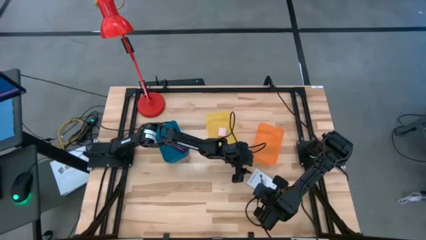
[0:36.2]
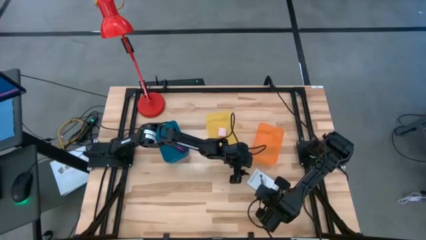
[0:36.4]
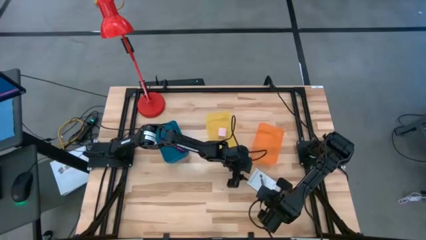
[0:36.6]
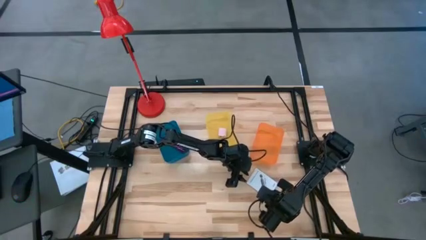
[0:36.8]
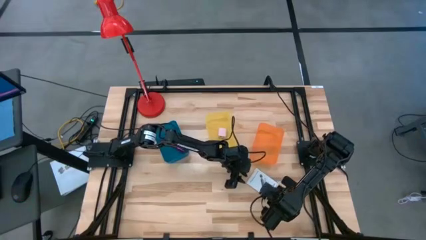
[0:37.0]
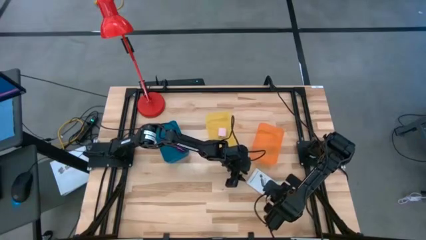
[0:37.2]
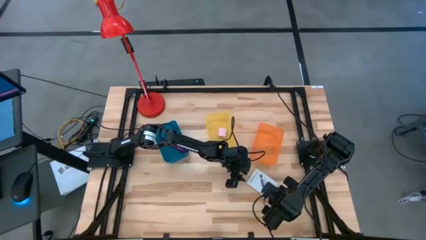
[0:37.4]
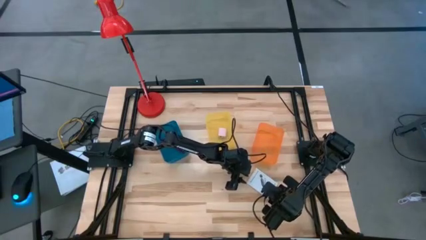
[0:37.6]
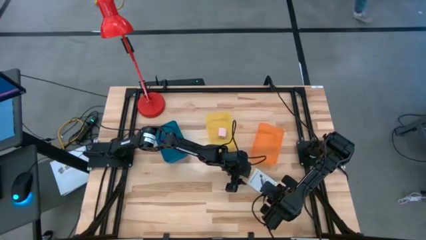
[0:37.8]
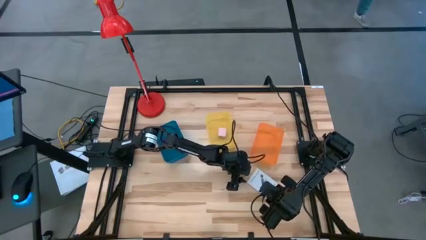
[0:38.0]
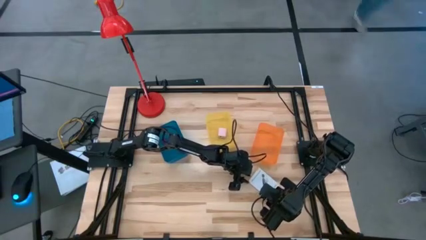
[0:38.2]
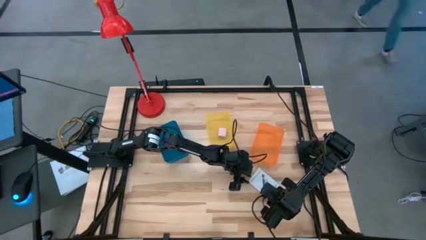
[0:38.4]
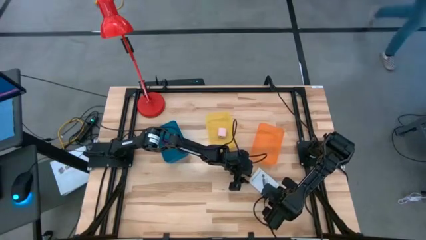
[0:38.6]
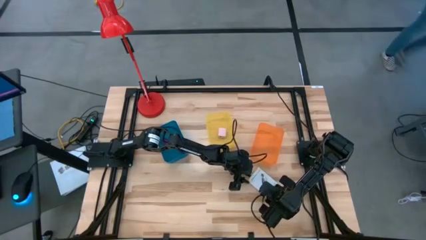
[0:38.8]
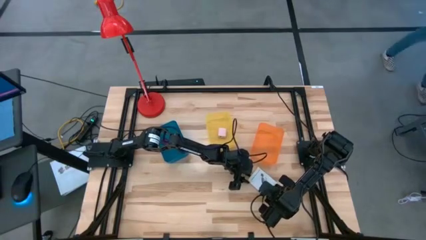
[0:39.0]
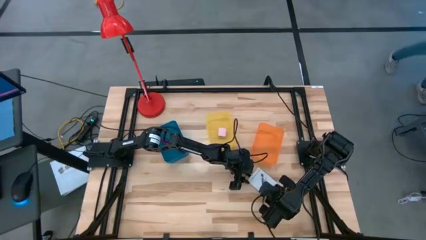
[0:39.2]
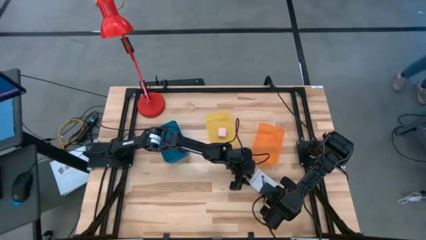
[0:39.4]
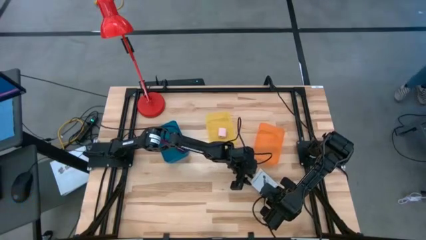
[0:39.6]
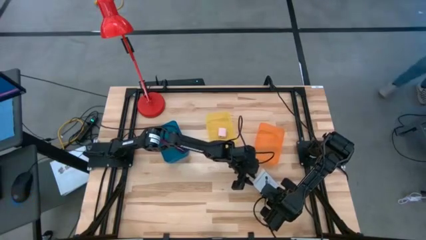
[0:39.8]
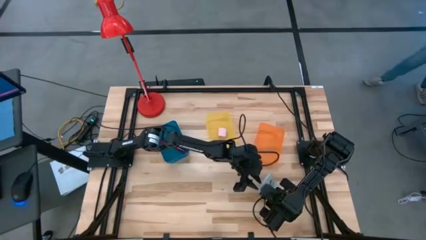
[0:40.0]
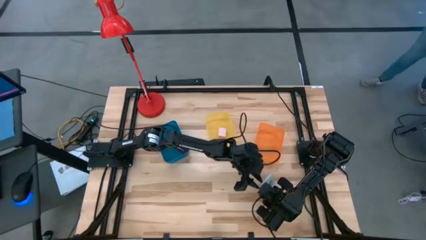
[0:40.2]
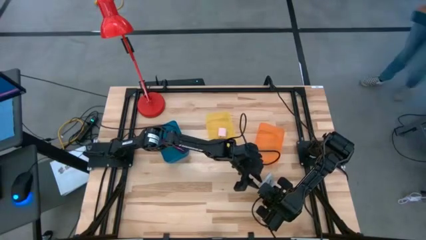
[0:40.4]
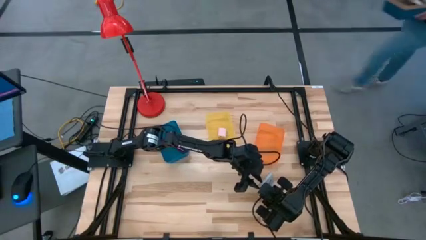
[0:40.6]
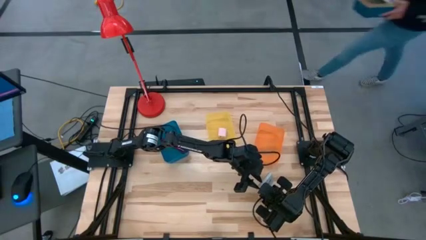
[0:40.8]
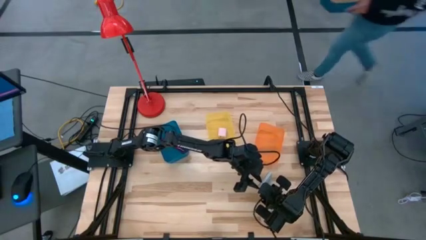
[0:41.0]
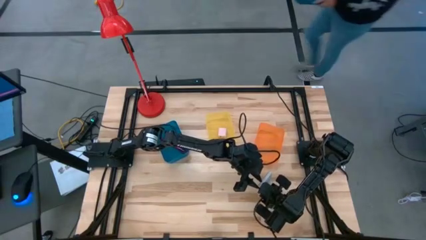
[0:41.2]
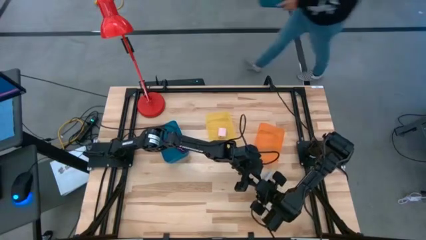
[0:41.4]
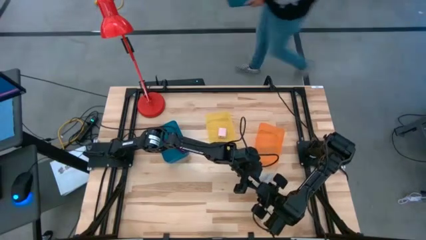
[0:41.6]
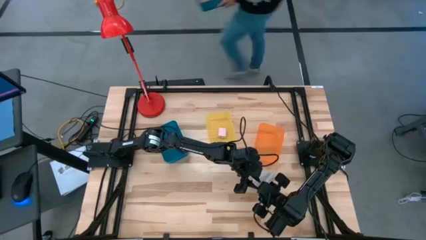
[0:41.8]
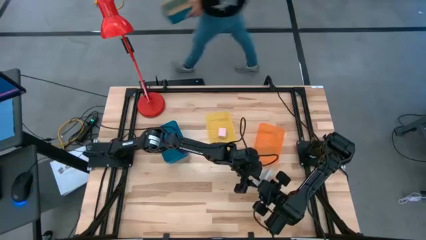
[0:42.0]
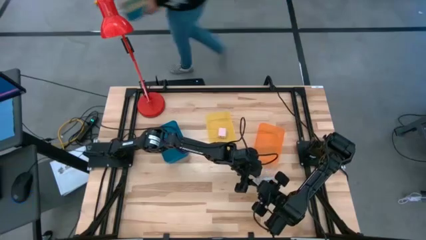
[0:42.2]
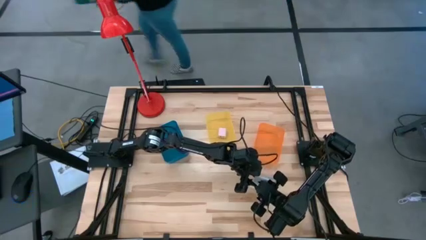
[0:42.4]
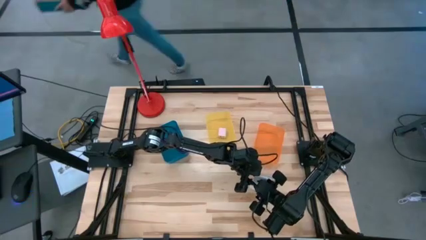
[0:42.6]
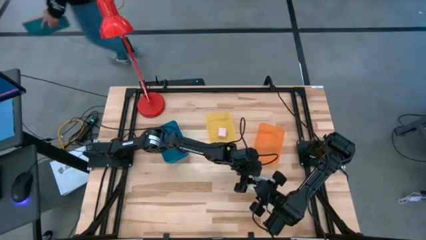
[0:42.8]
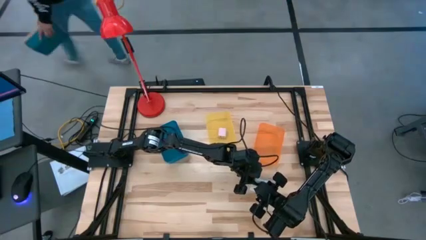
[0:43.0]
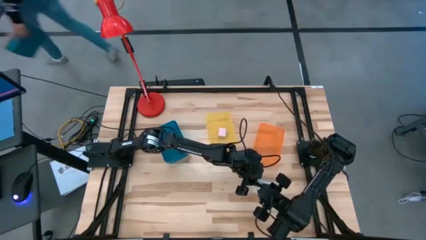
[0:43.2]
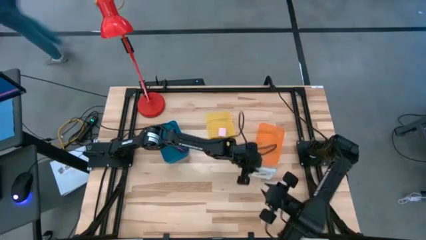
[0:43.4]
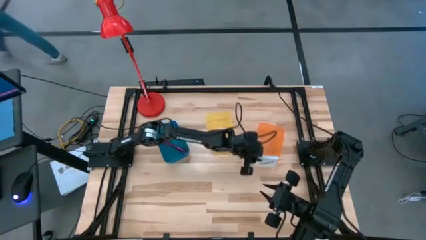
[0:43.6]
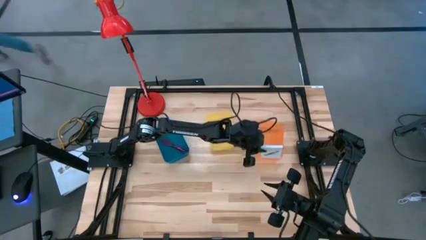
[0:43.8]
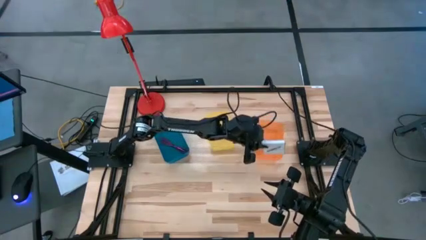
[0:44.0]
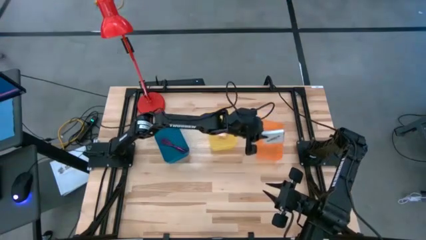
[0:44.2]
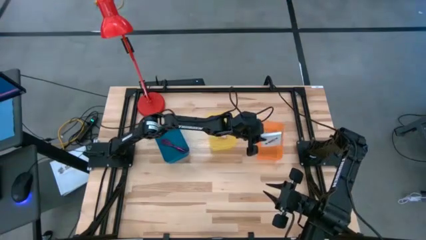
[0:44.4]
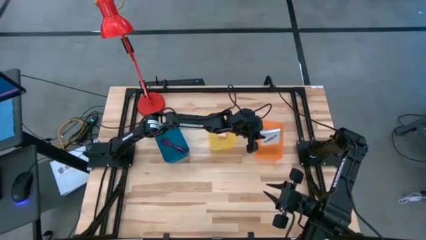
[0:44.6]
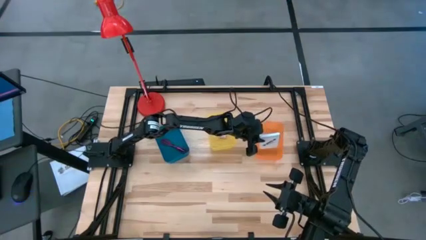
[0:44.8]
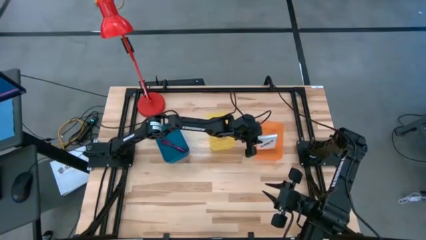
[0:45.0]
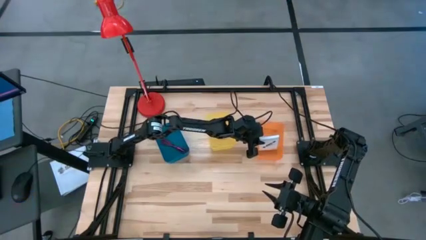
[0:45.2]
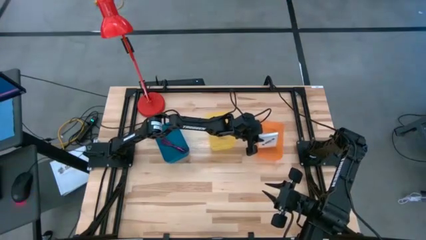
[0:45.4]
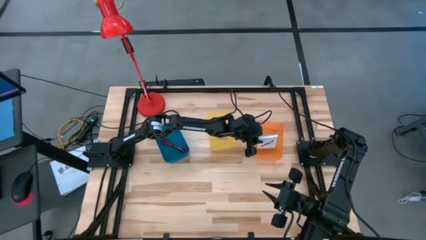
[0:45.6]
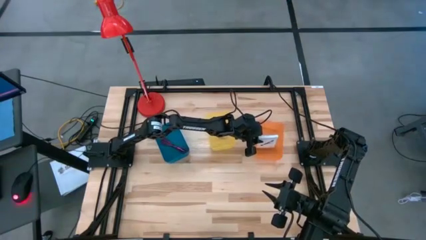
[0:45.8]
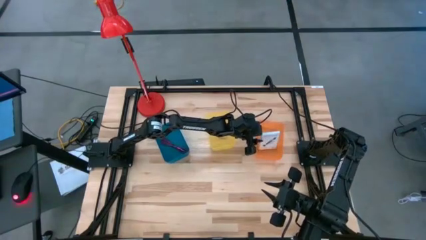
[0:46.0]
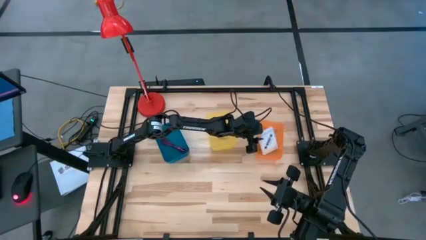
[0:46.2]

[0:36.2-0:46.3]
Task: Pick and place items into bin
Put the card reader box into the orange bin

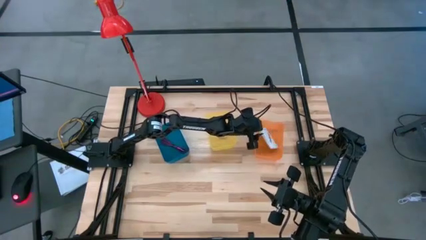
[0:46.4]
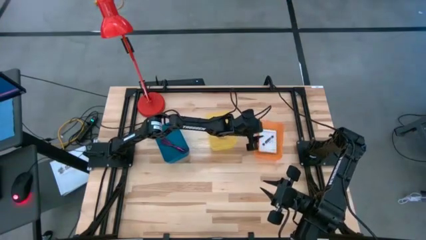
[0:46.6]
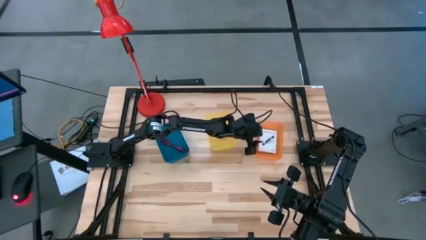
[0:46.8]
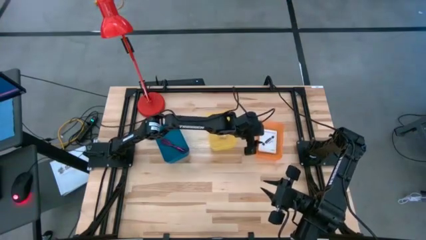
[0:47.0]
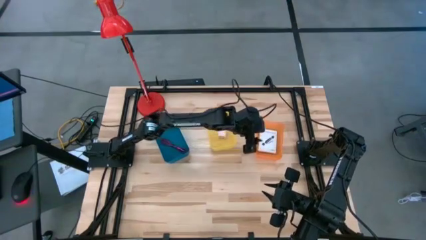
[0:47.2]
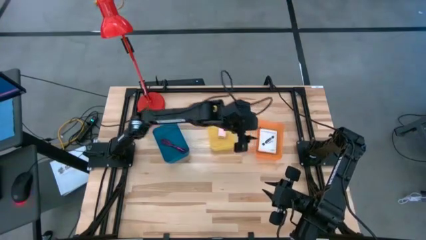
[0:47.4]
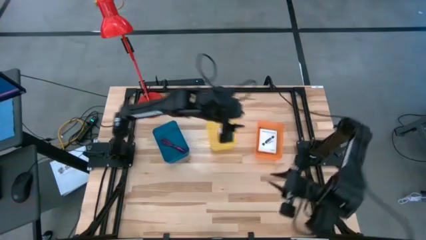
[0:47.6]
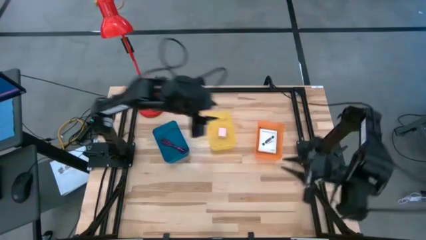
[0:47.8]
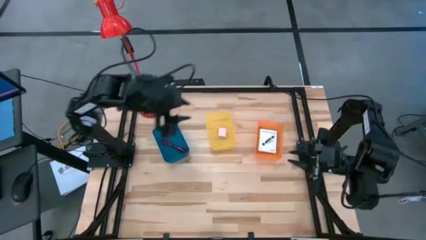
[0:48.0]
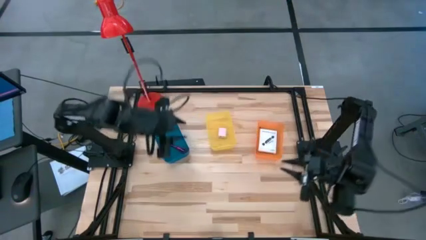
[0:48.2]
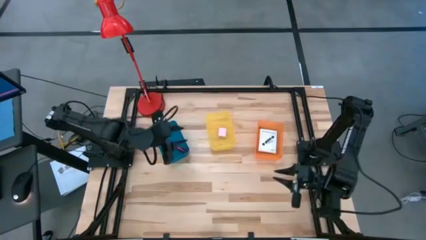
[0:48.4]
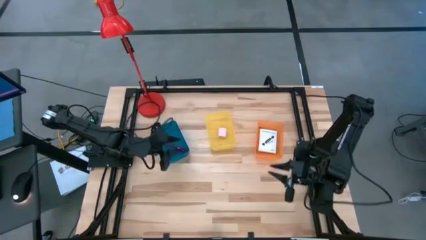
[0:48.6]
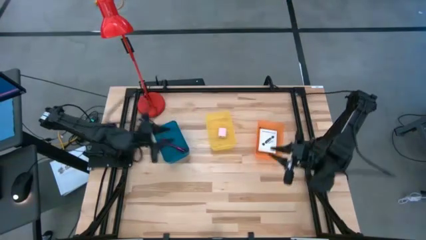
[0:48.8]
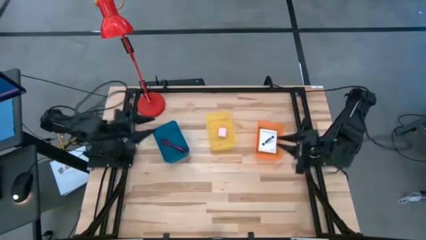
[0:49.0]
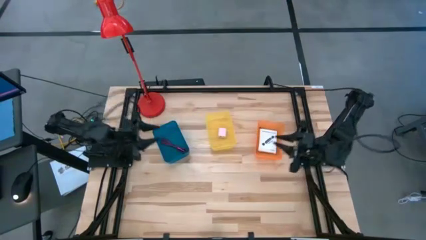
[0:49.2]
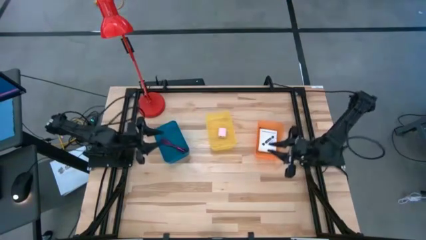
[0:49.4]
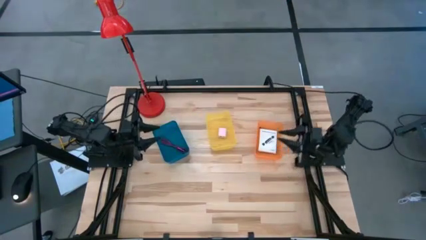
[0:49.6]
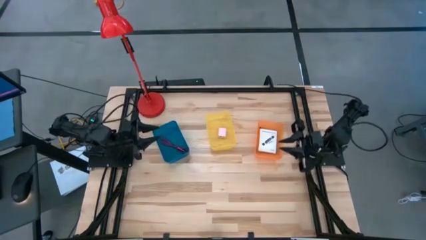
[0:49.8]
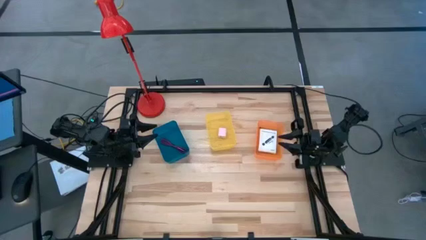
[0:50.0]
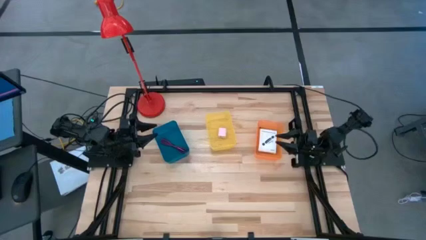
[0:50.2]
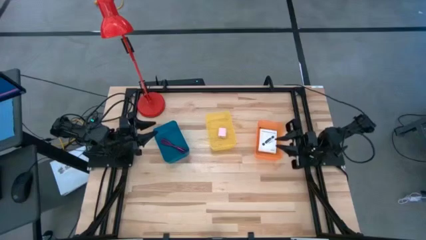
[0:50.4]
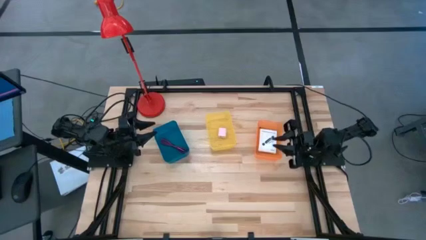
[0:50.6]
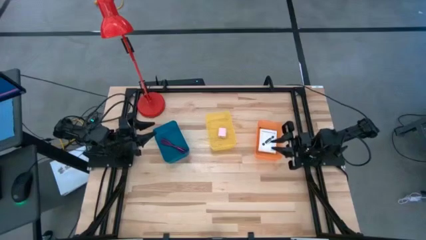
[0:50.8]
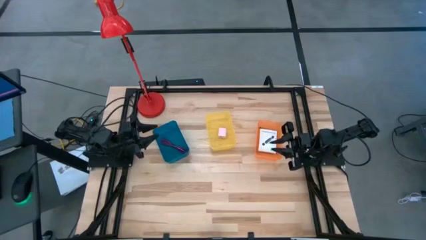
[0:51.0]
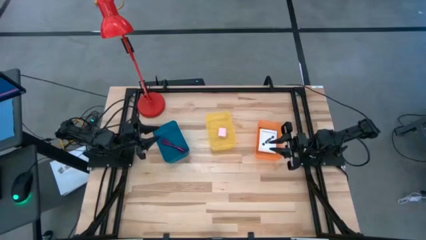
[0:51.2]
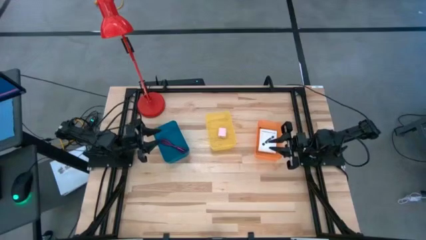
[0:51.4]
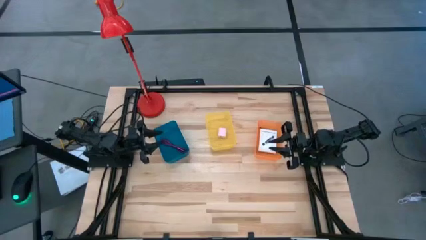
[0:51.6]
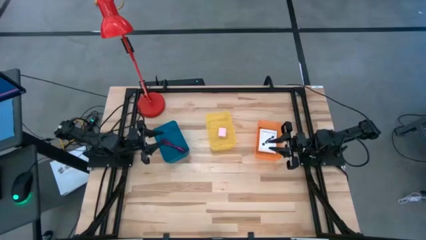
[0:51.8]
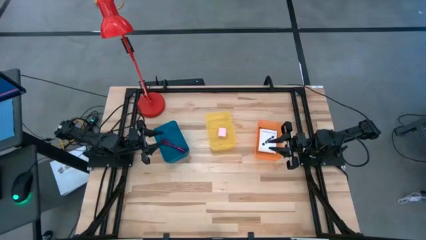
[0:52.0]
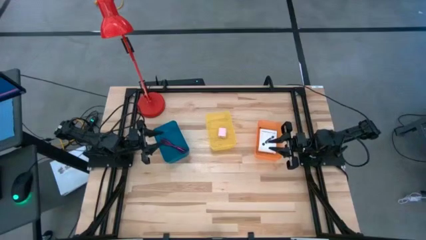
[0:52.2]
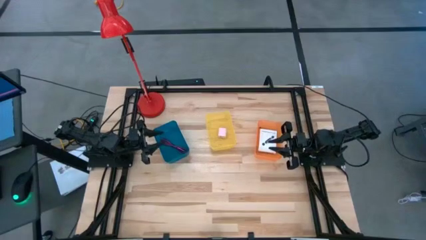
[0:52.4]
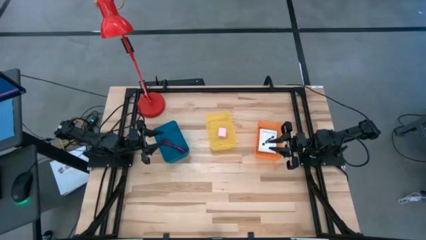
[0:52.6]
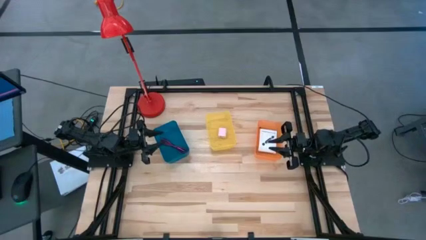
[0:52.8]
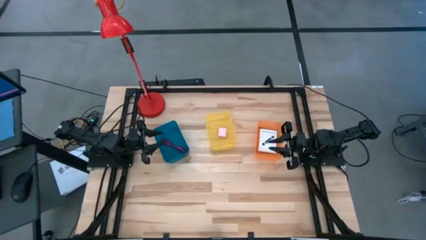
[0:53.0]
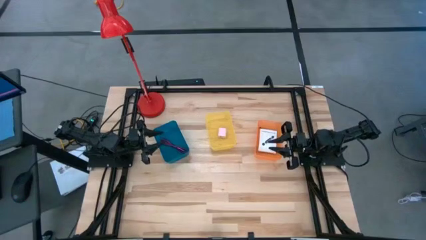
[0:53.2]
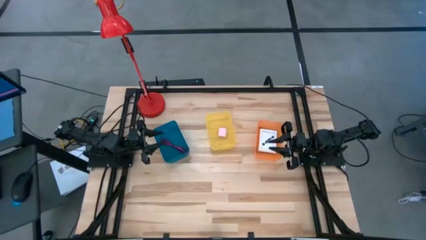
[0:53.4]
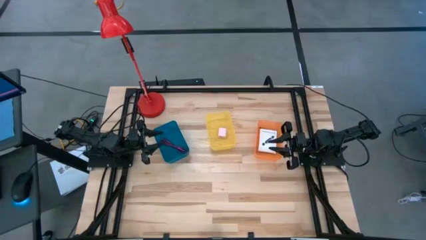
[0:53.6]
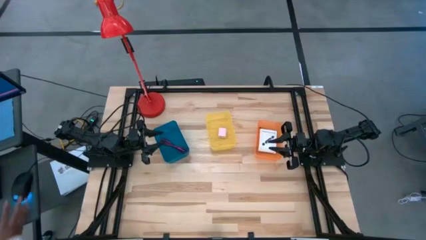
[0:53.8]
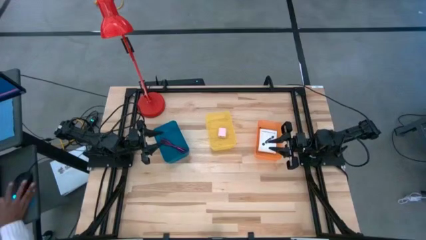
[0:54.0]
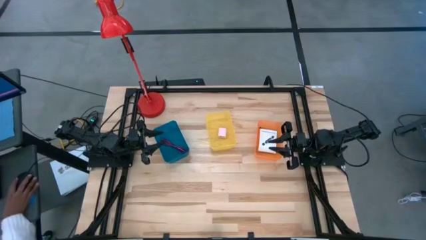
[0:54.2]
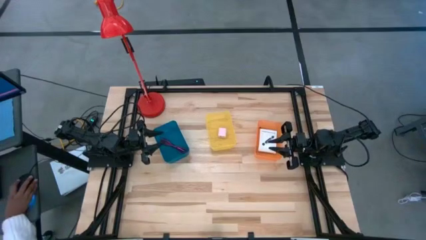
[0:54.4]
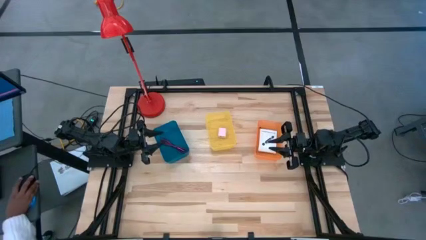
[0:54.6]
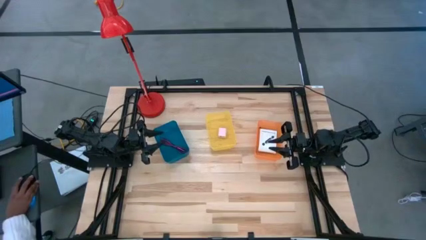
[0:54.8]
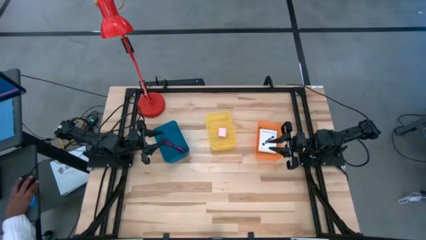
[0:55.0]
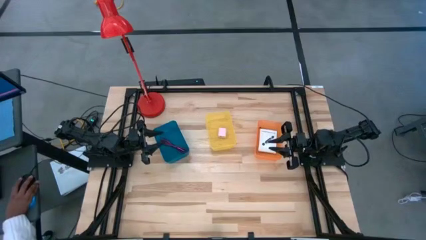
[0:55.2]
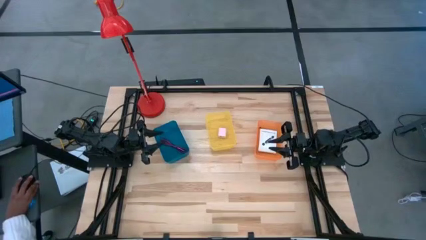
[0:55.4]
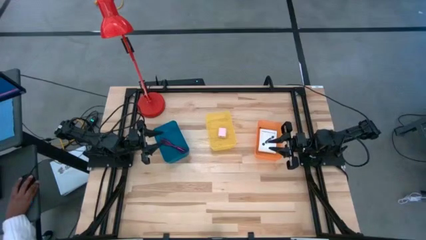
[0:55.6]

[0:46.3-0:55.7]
Return to Home Position
